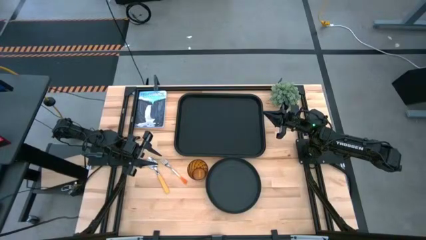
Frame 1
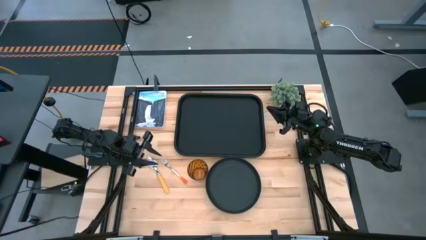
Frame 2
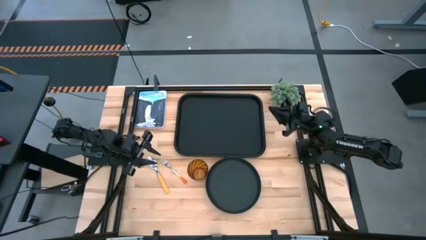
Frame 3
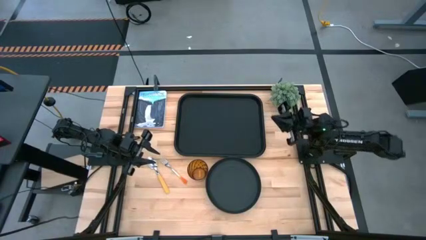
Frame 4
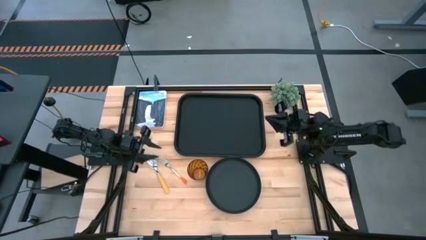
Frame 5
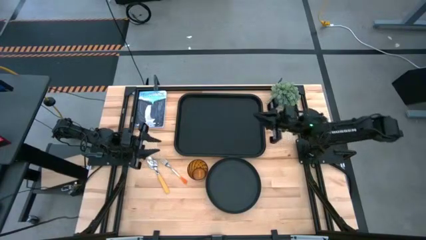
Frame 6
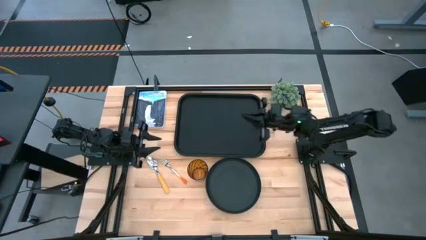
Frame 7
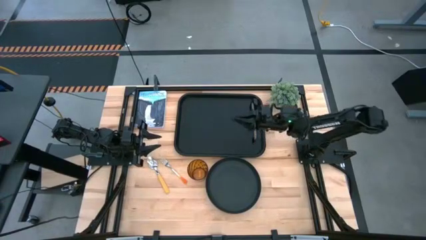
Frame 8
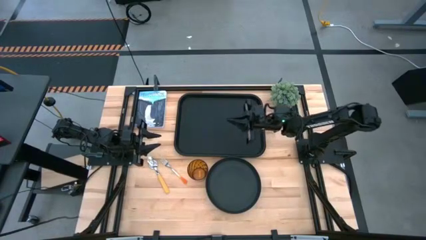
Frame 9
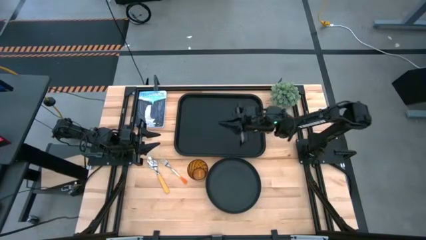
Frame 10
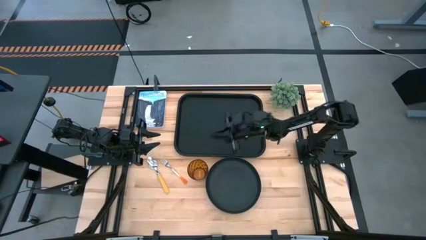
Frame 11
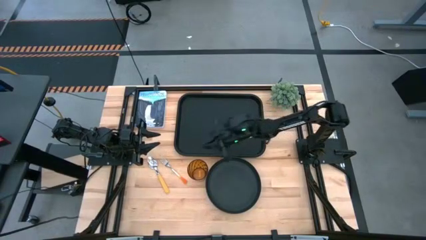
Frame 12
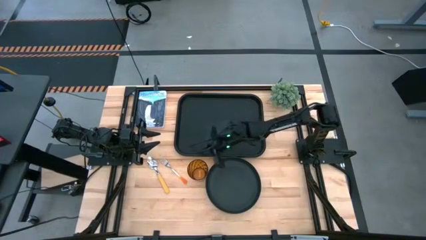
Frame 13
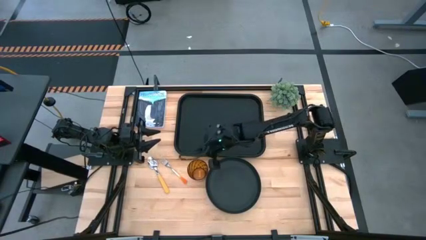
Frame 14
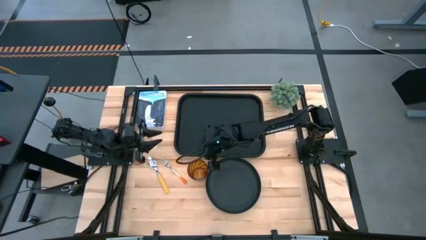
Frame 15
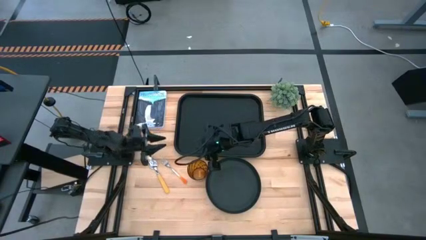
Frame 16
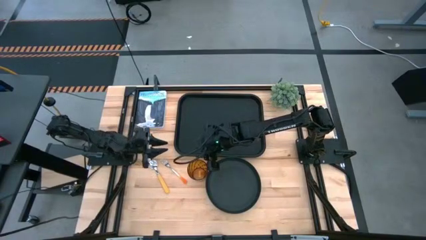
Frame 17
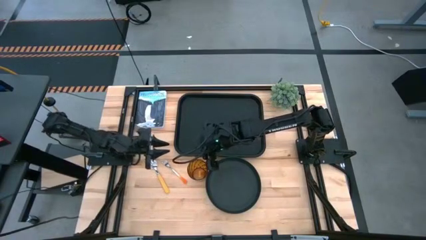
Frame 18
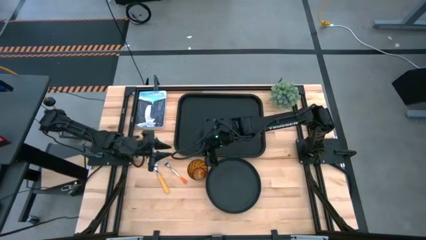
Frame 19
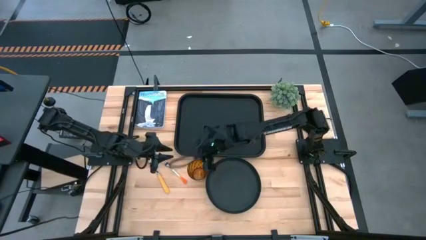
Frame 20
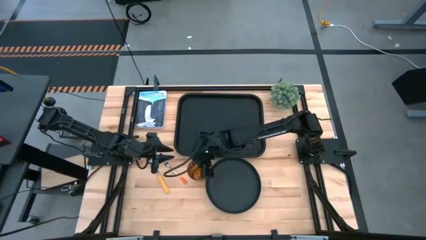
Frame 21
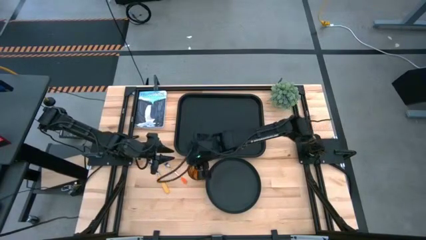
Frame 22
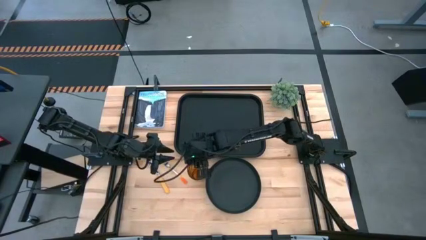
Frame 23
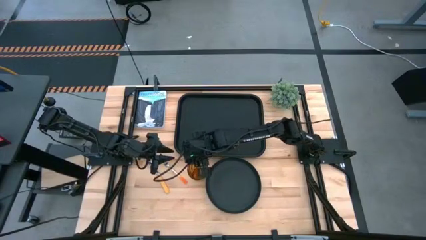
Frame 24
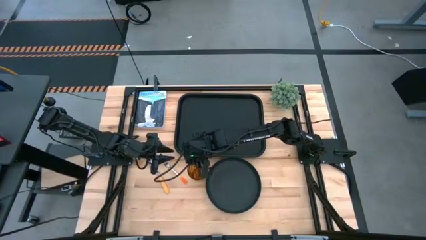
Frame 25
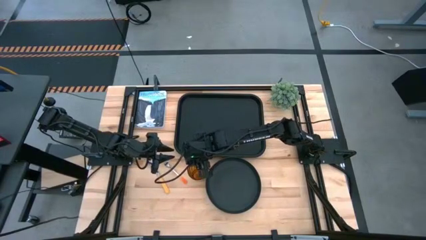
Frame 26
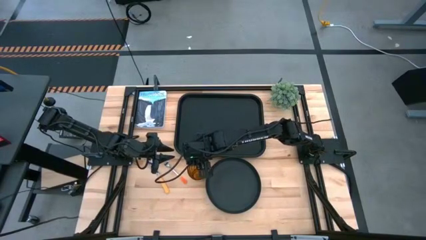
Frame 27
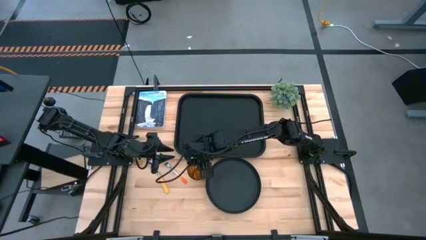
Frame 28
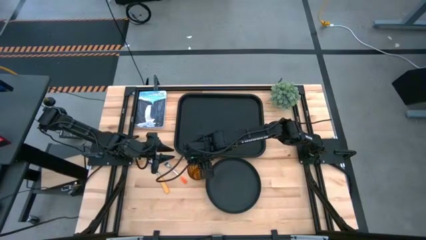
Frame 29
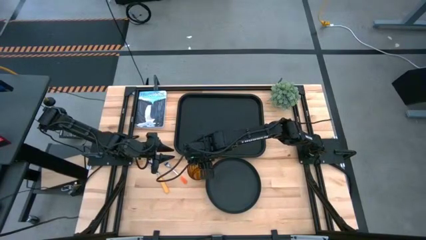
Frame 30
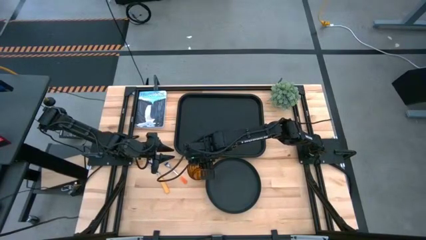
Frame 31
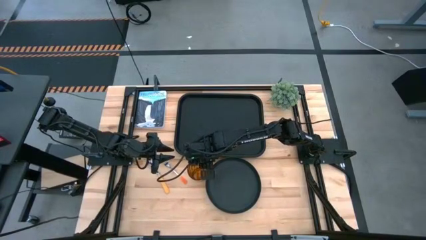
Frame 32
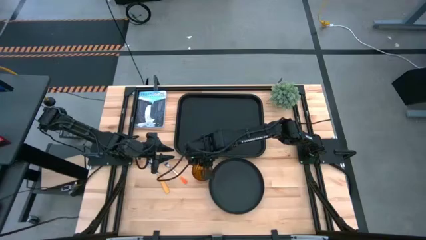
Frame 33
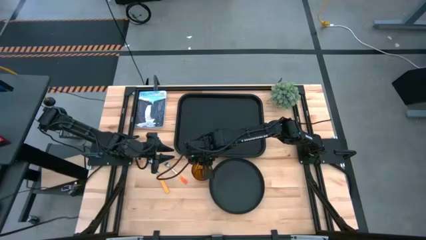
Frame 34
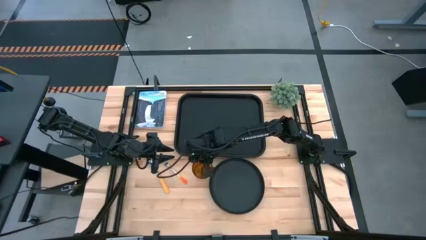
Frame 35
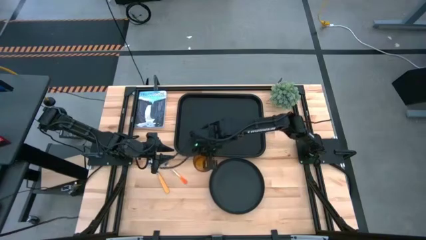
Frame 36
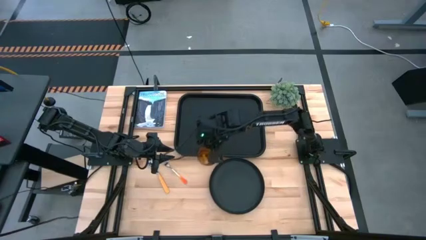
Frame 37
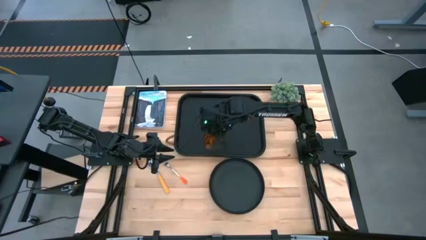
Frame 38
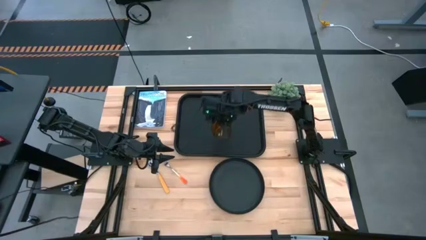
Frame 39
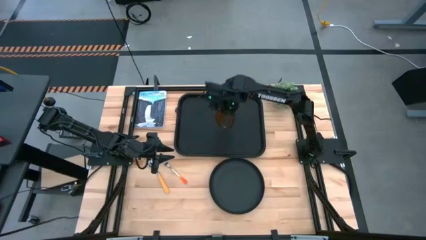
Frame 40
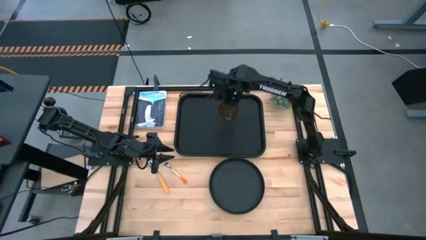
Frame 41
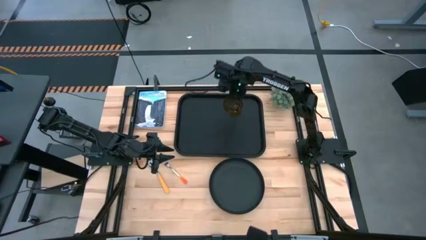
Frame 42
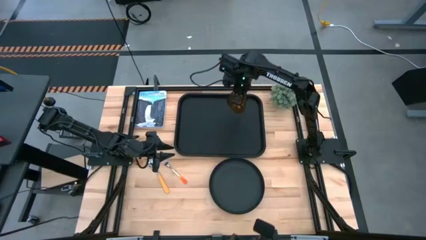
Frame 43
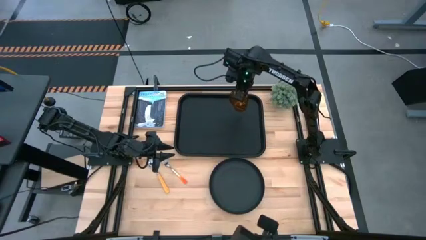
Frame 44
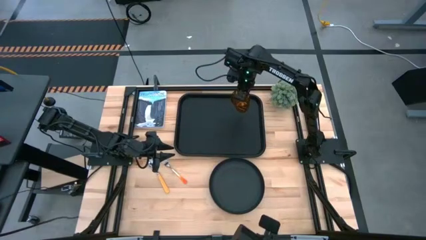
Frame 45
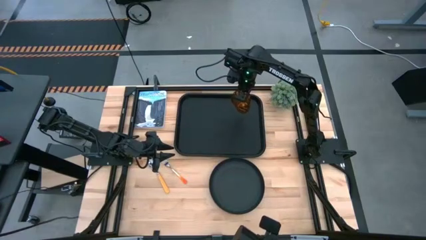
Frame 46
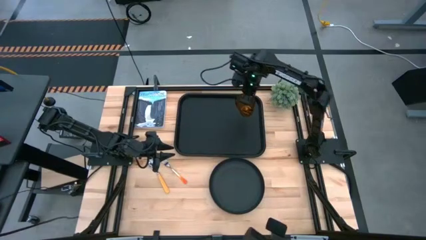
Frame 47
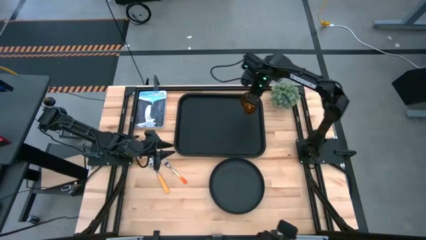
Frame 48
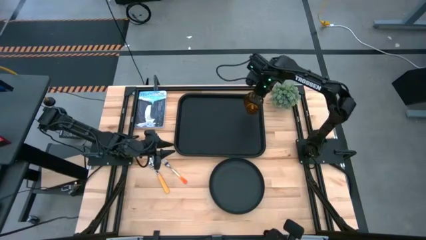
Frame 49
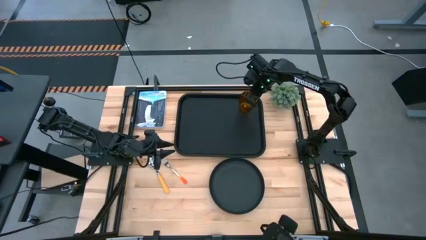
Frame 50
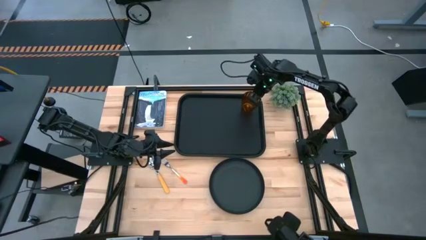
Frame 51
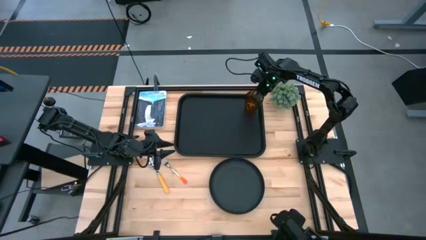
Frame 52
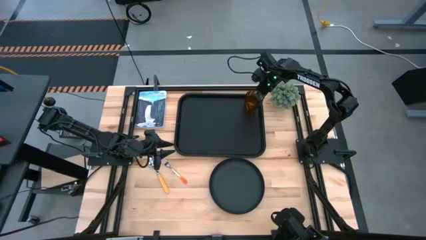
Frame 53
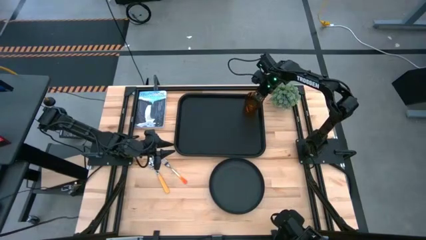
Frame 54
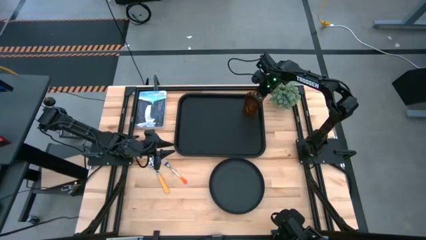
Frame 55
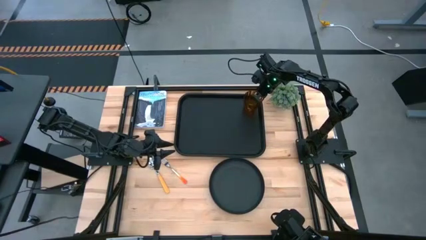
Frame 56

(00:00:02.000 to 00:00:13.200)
Task: Pick and place plate/cup/fork/spoon on tray
Put the brown cup on the black tray

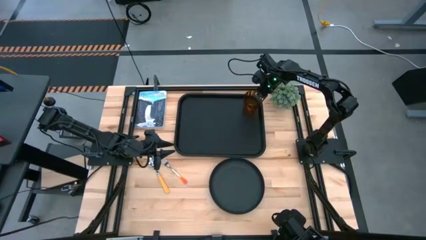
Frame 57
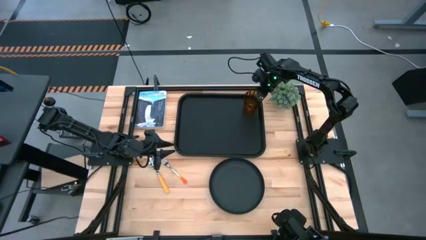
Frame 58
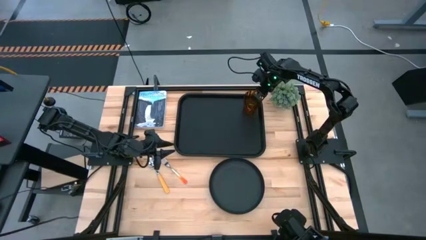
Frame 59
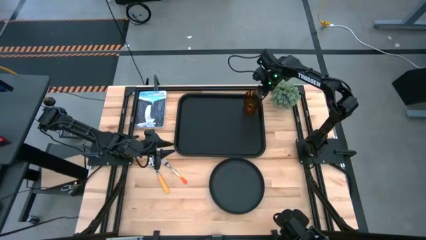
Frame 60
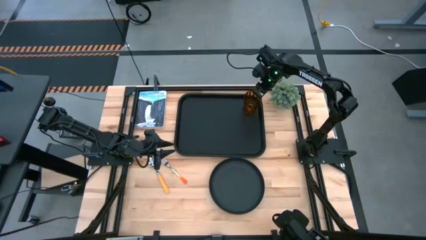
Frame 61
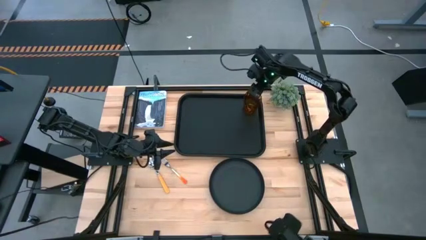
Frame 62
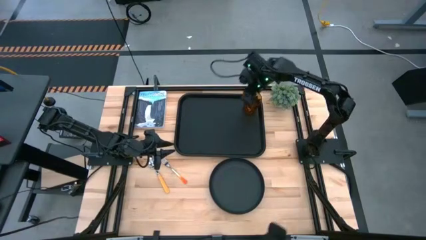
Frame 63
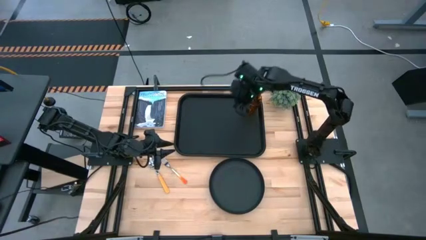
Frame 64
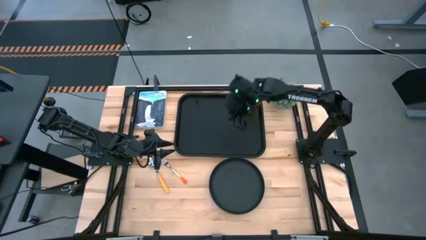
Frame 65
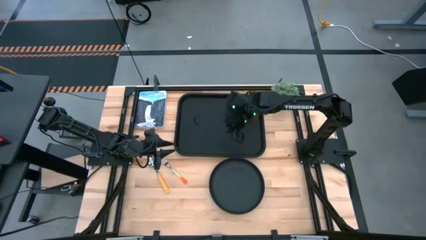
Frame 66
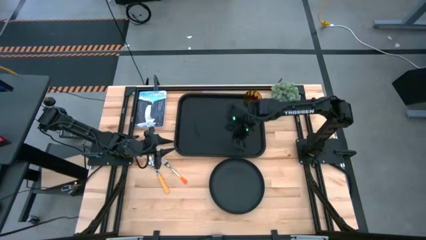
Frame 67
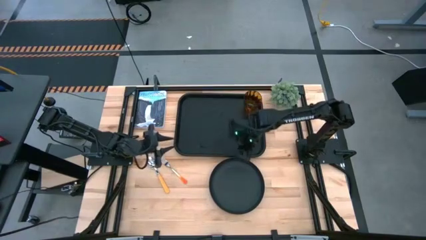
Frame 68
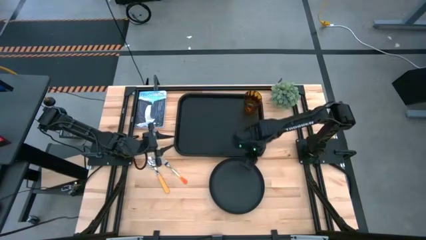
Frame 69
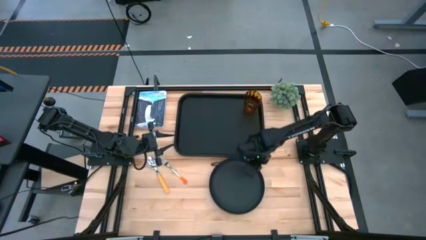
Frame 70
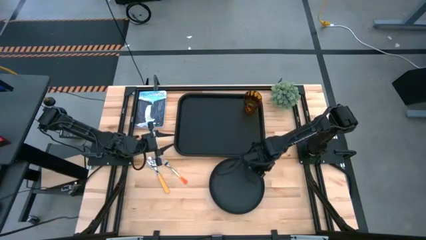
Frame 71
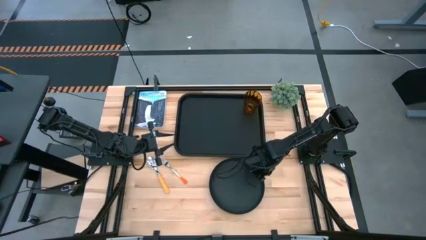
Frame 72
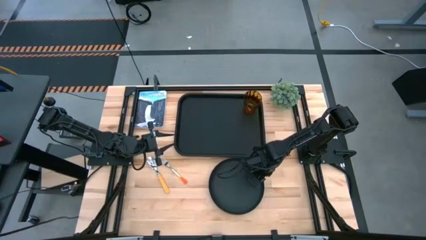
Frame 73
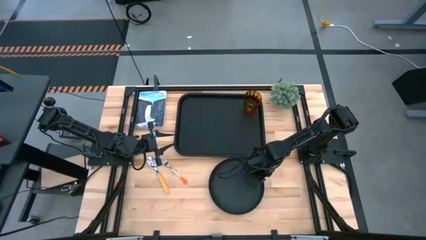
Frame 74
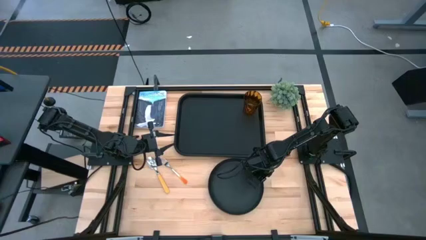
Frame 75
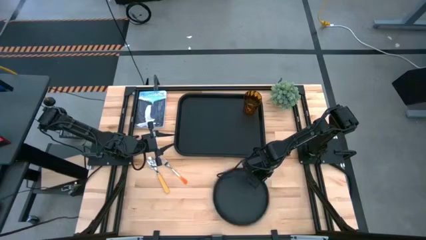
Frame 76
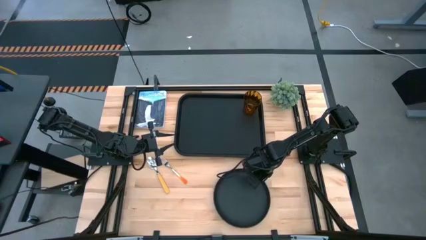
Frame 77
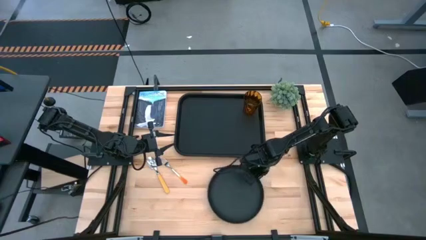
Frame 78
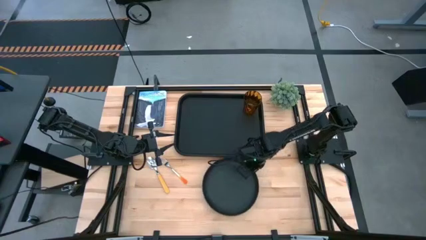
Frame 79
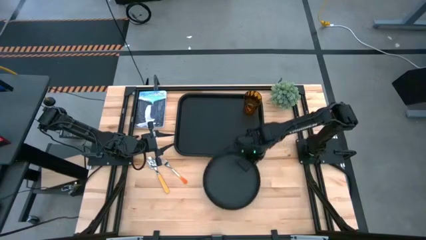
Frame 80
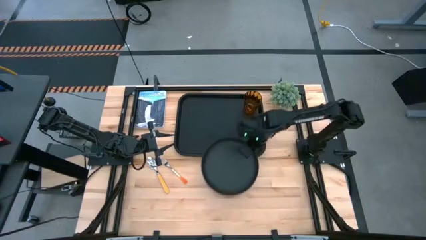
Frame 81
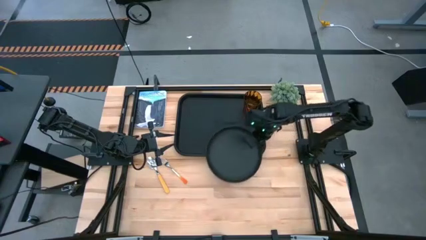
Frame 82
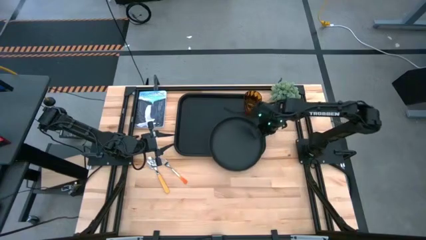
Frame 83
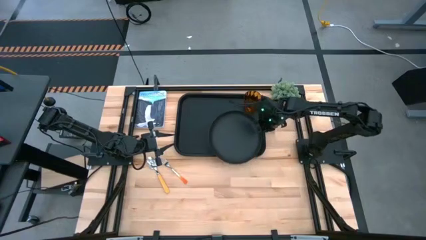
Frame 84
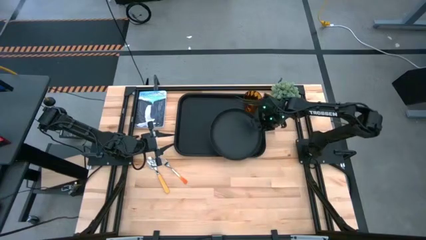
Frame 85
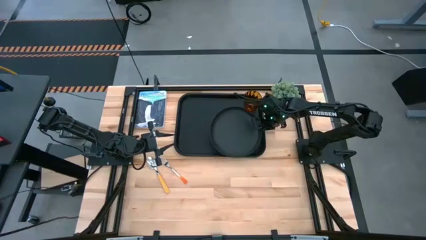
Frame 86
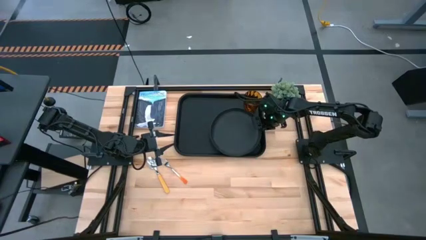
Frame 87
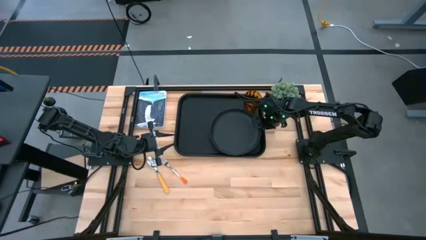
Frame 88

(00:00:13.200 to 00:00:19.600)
Put the black plate on the bottom left of the brown cup
